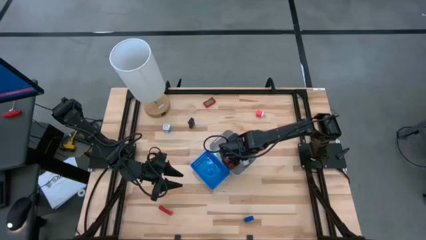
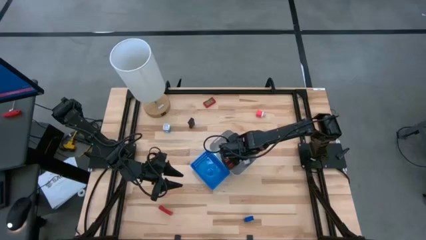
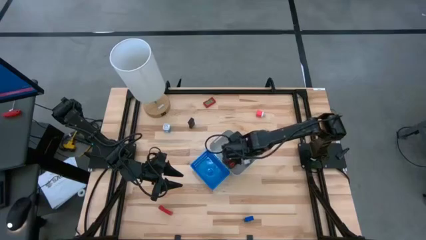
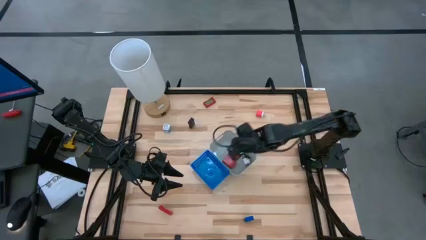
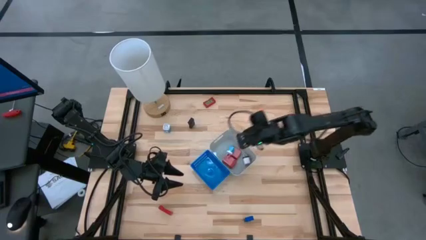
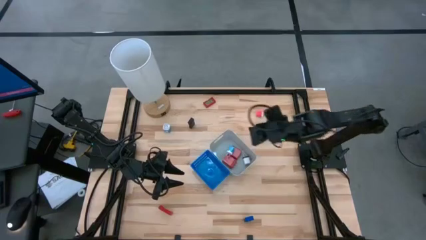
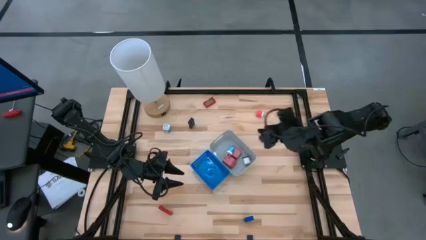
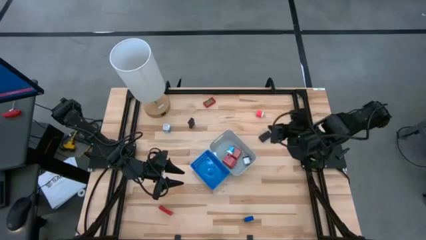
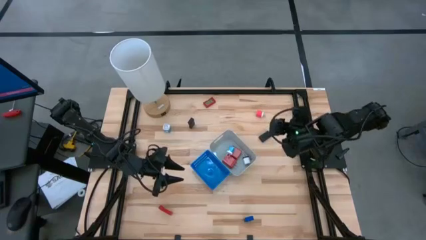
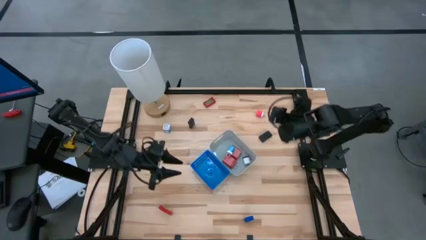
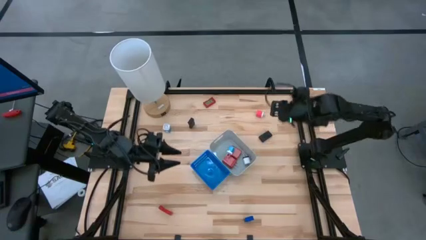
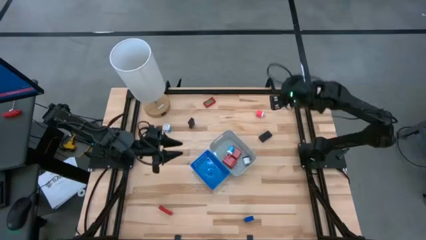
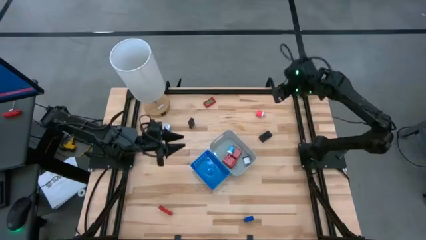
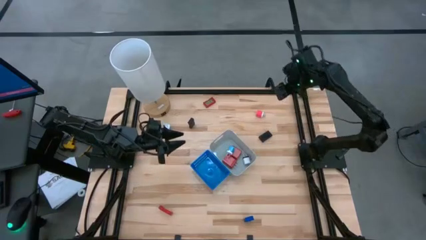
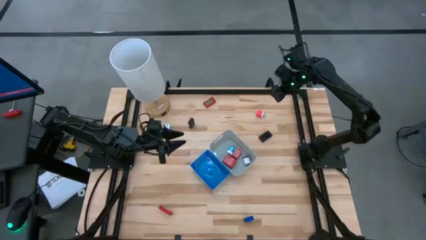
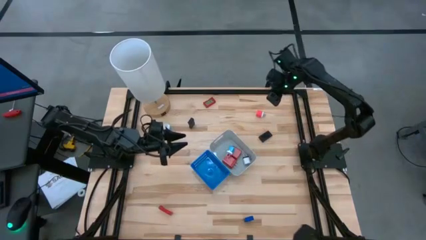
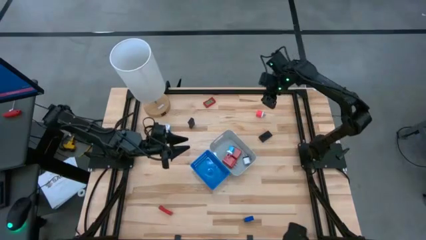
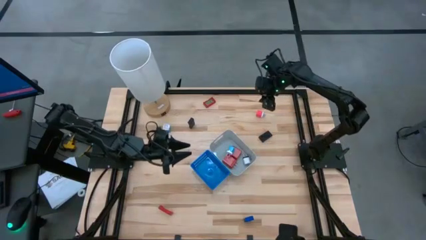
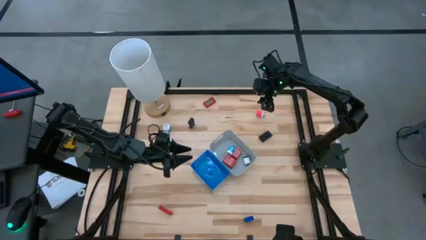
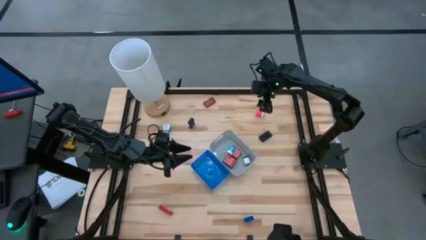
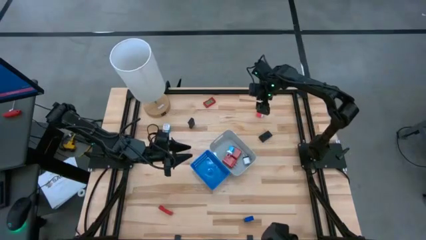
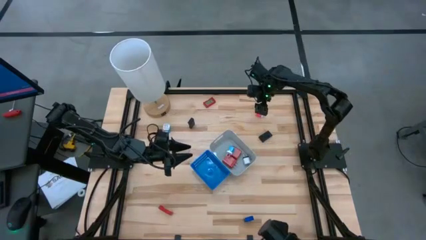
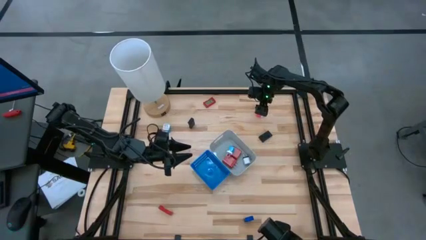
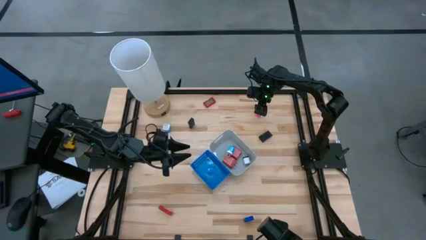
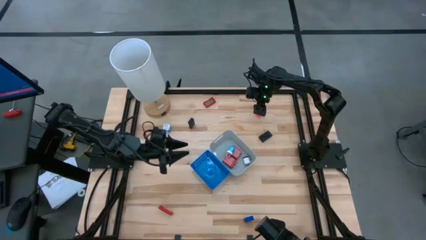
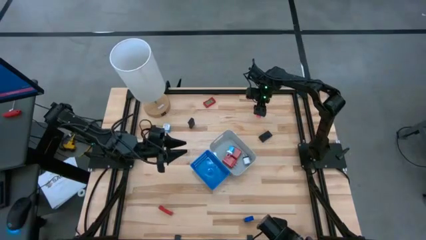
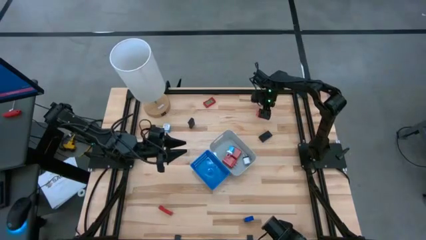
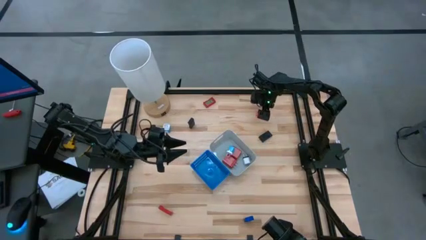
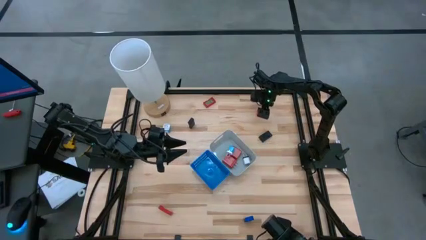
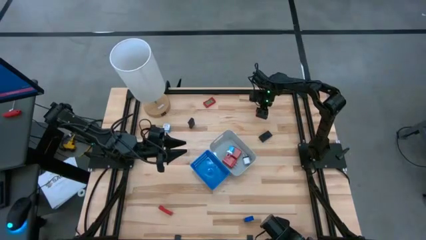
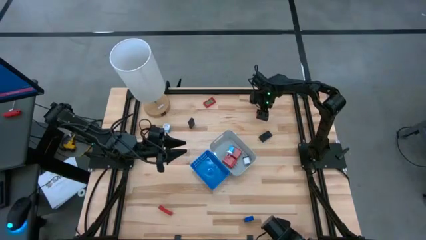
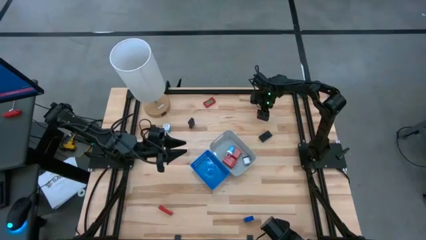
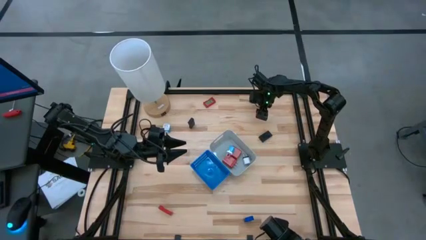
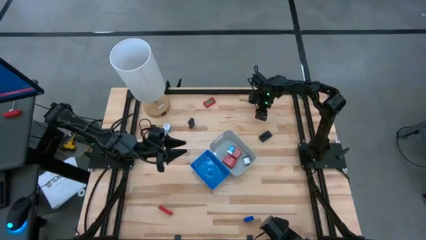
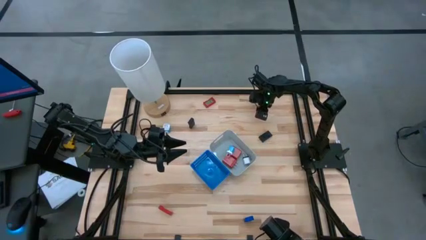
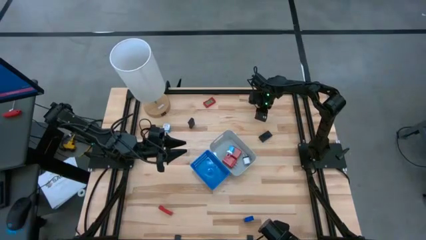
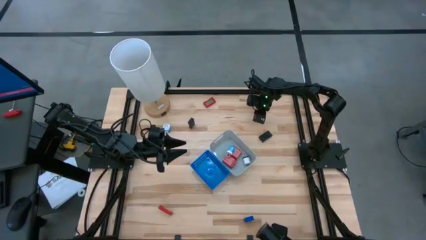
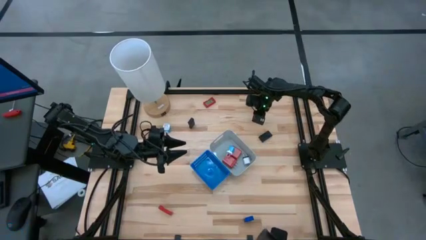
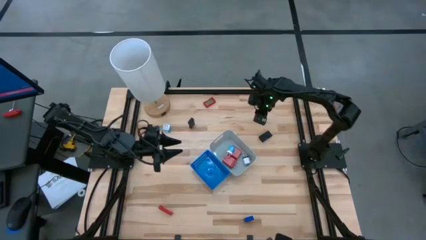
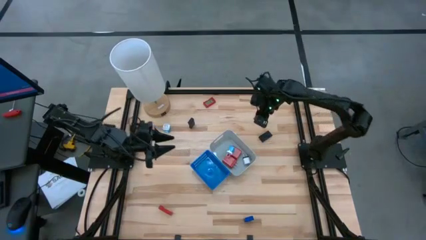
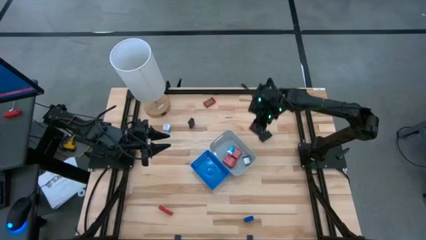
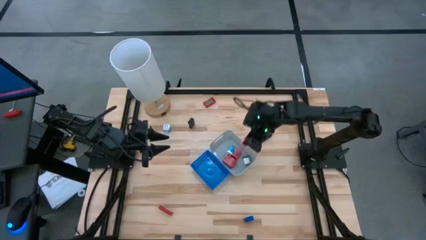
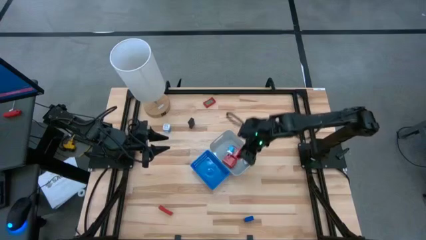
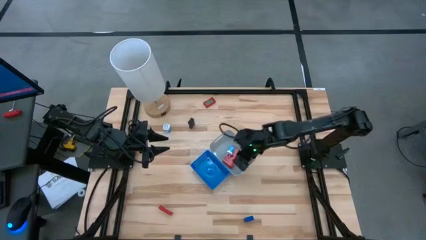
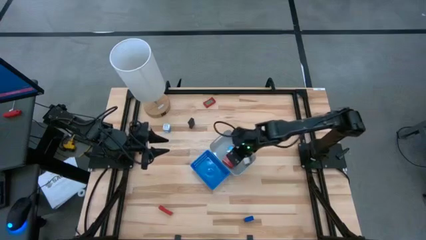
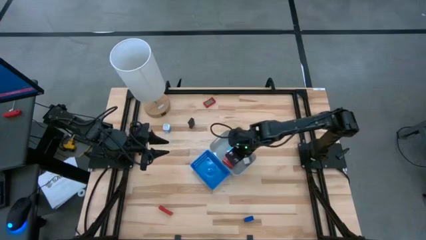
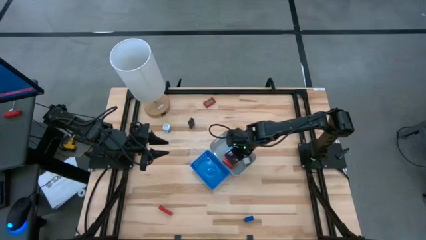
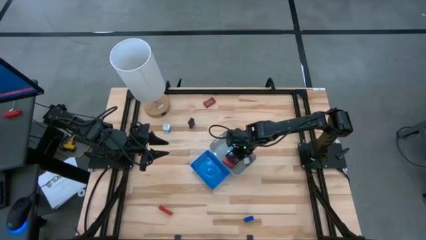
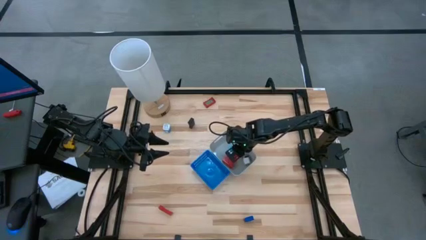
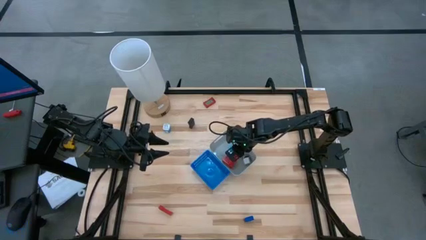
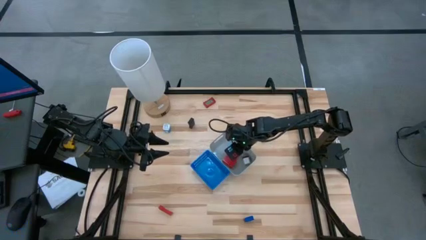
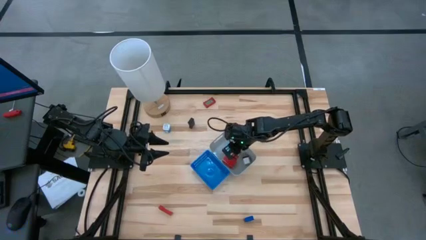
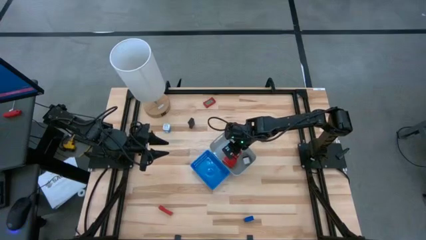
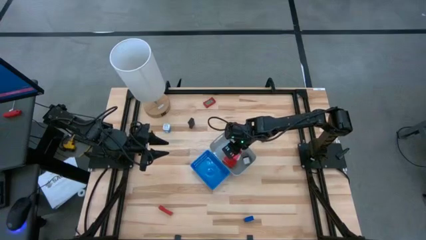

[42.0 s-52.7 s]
Task: Pick & Place Office items
Put the pink charger adapter into the gray bin

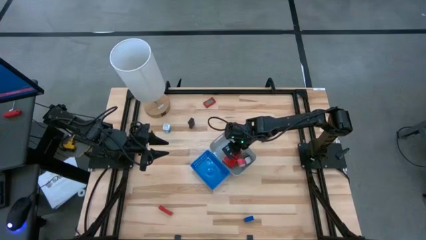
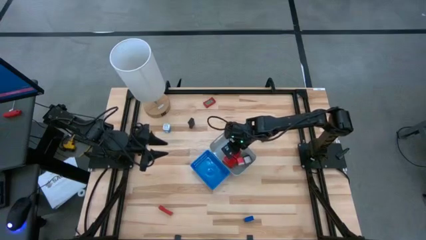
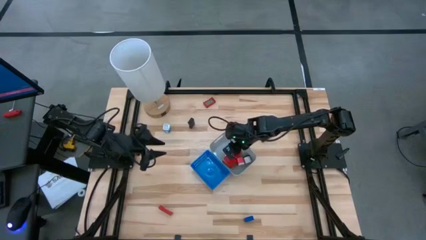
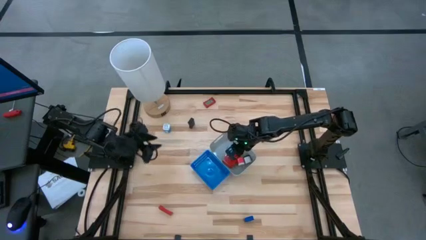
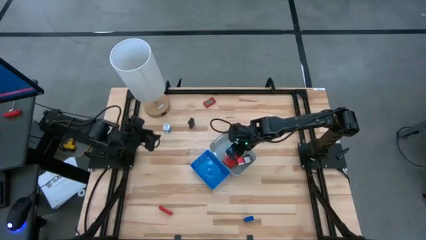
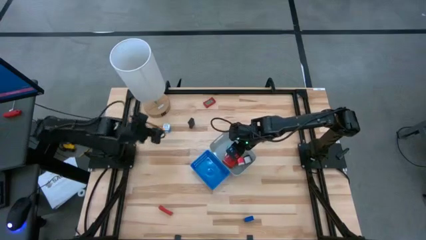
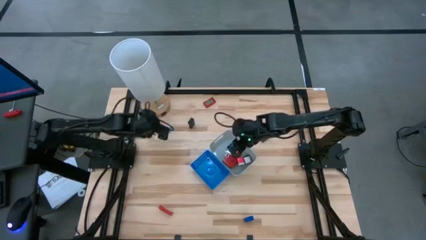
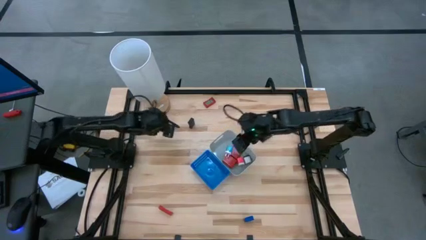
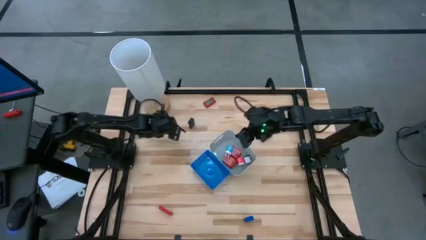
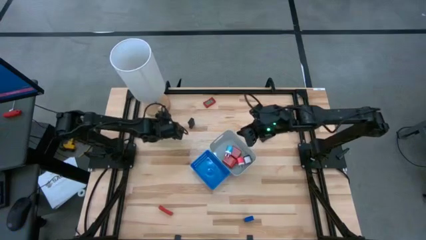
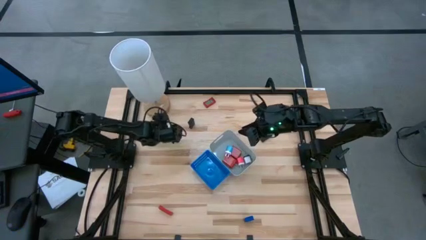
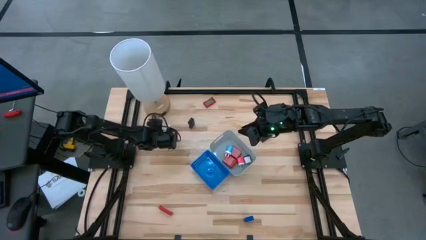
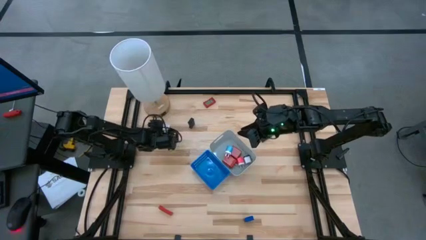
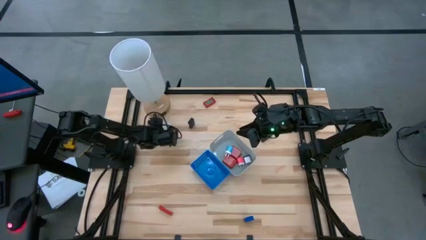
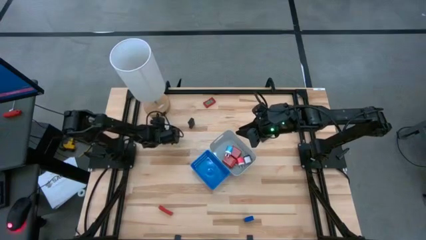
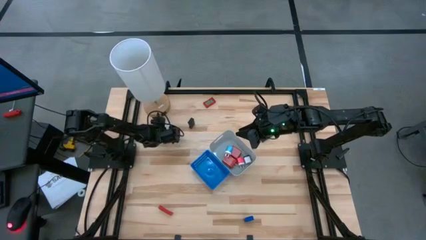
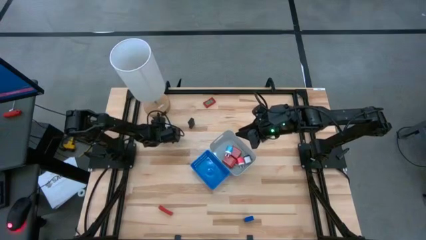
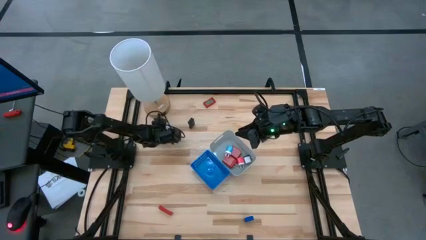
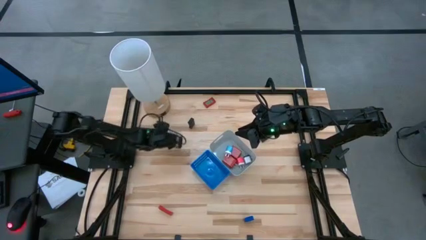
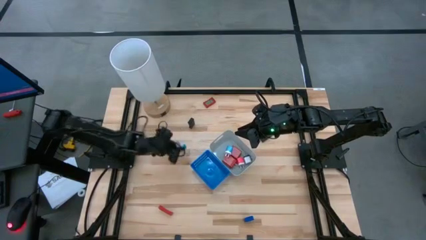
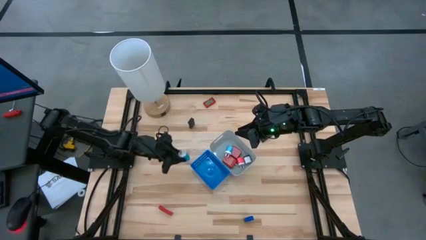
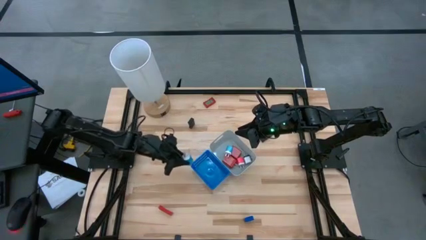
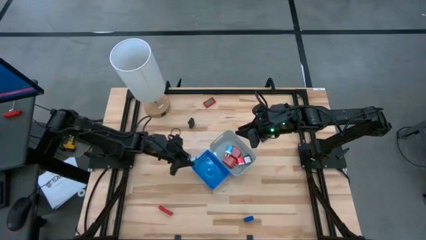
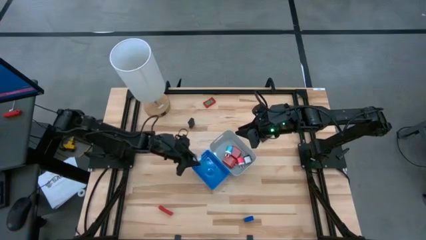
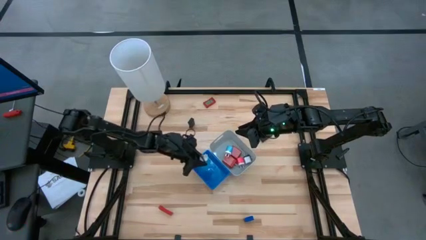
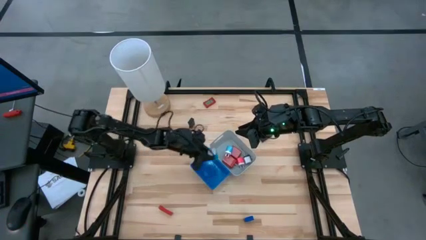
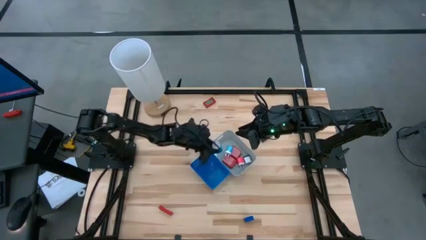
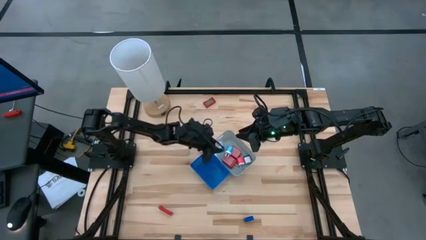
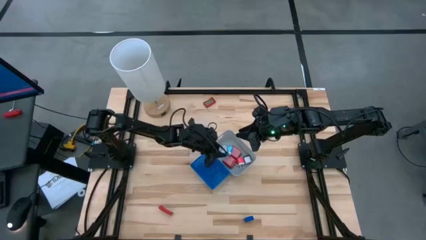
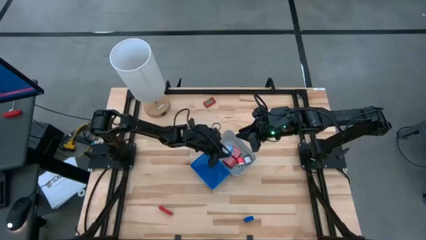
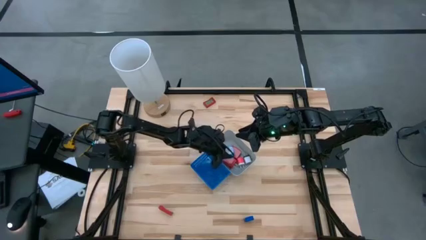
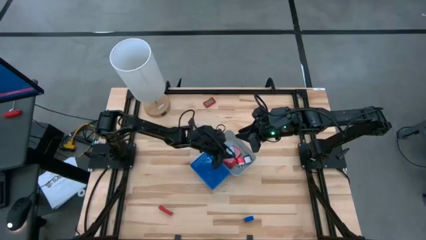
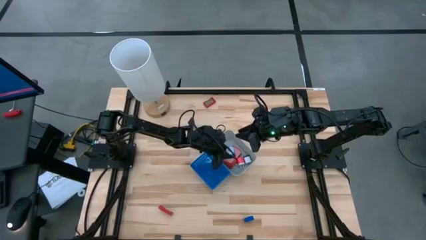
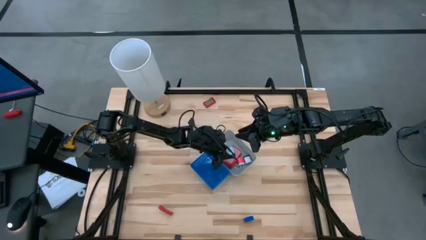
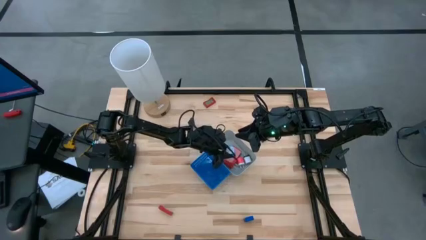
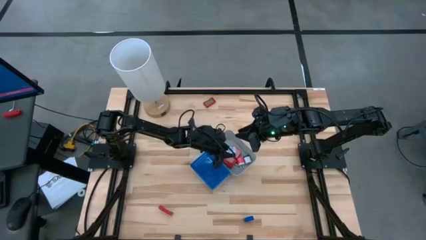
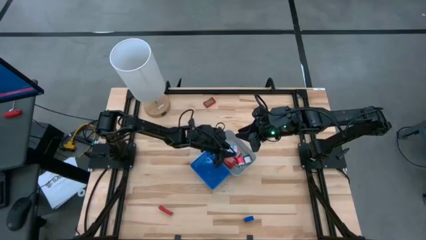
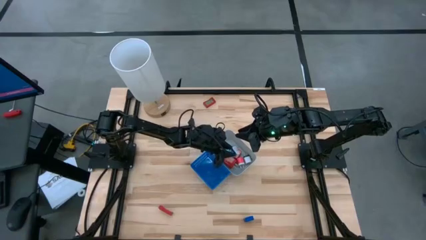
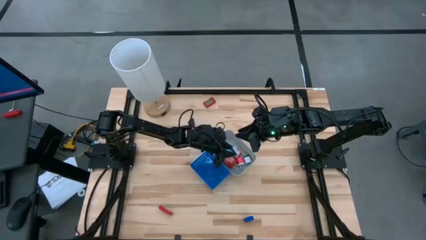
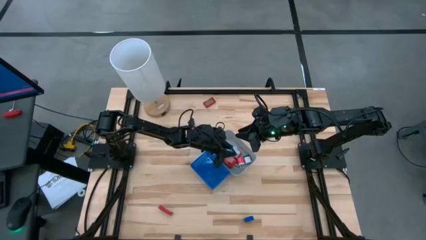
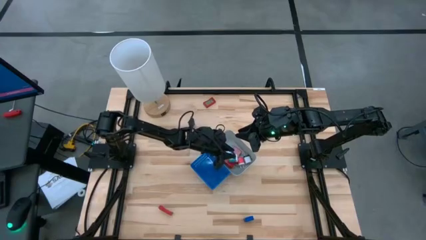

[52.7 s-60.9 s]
Put the blue charger adapter into the gray bin
